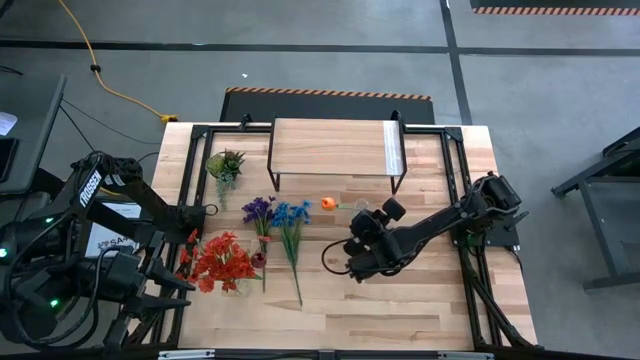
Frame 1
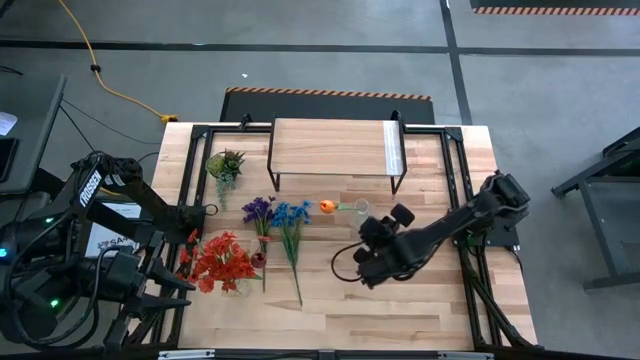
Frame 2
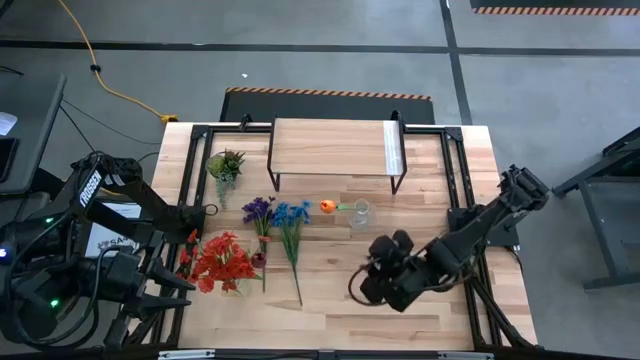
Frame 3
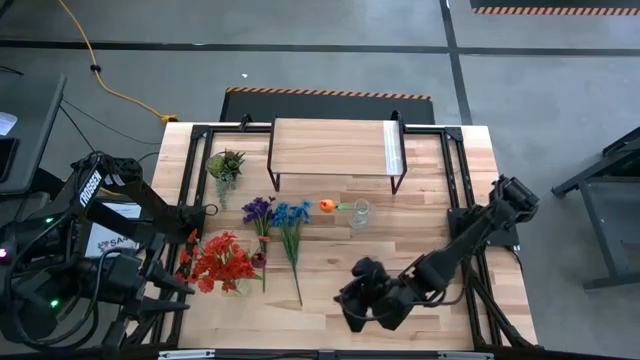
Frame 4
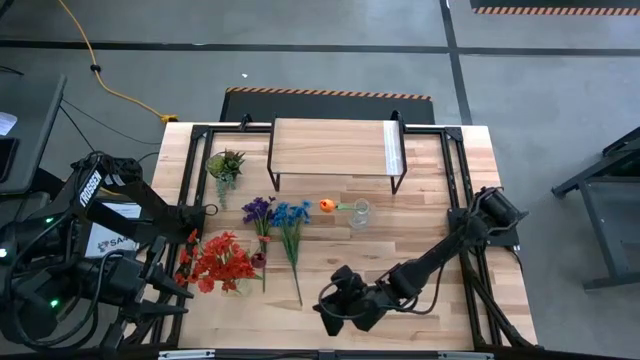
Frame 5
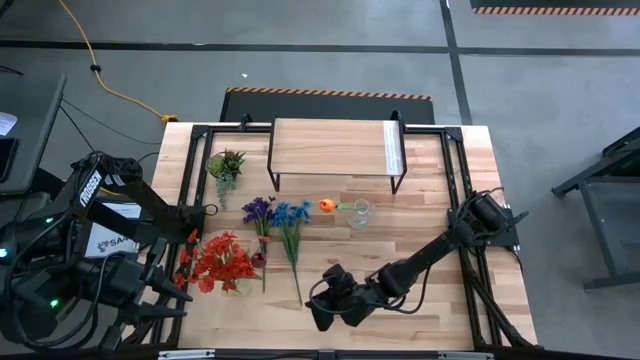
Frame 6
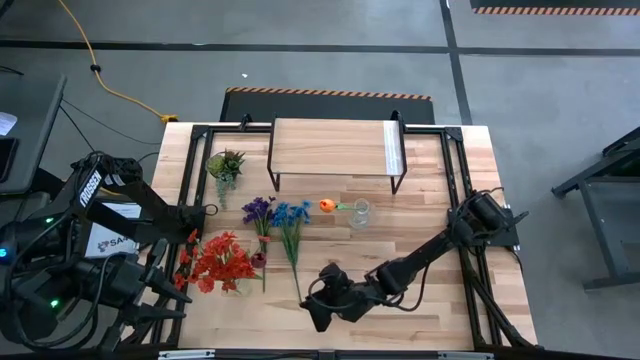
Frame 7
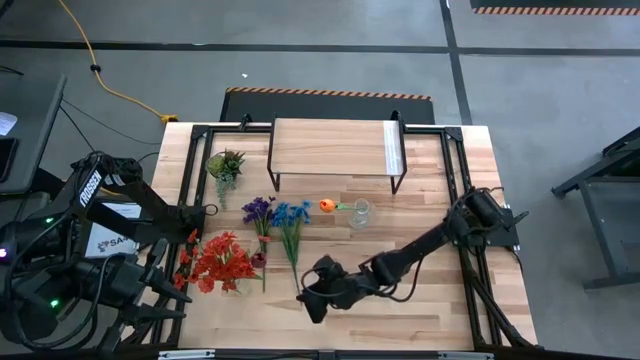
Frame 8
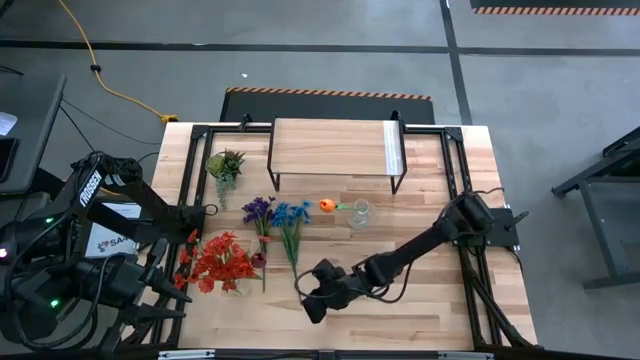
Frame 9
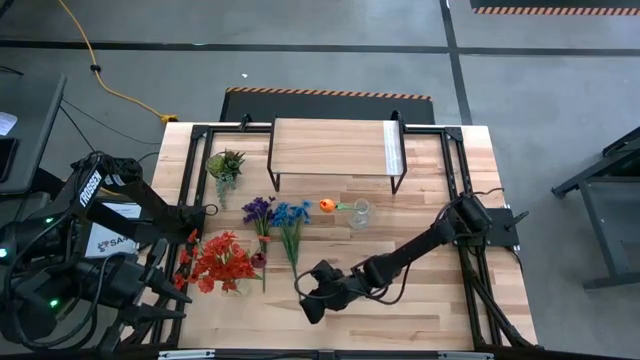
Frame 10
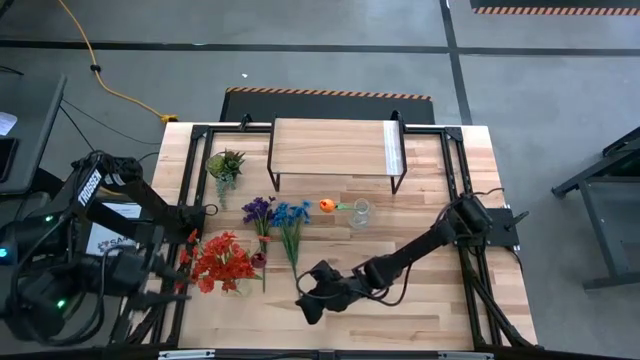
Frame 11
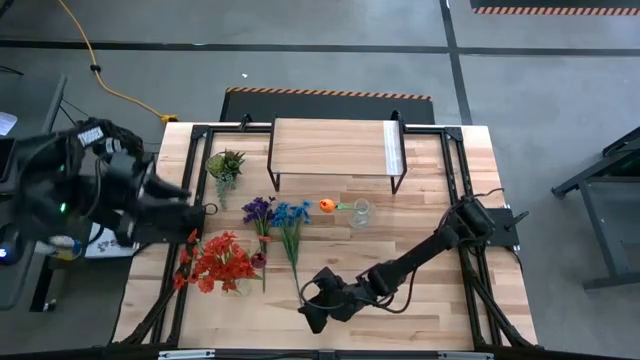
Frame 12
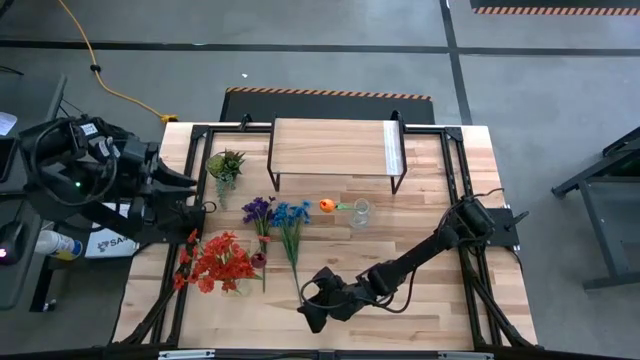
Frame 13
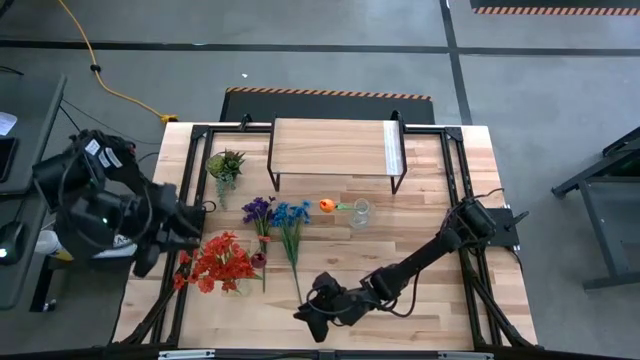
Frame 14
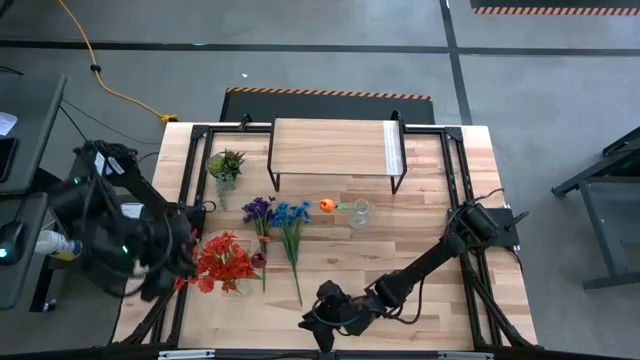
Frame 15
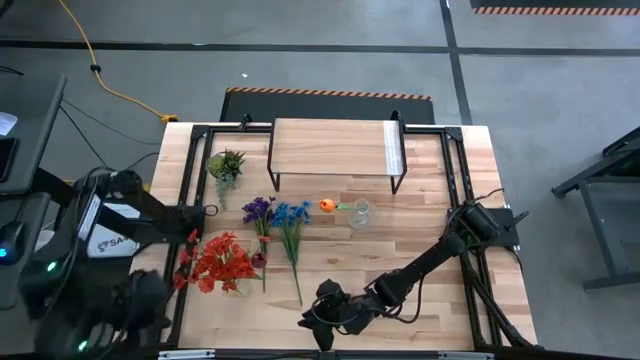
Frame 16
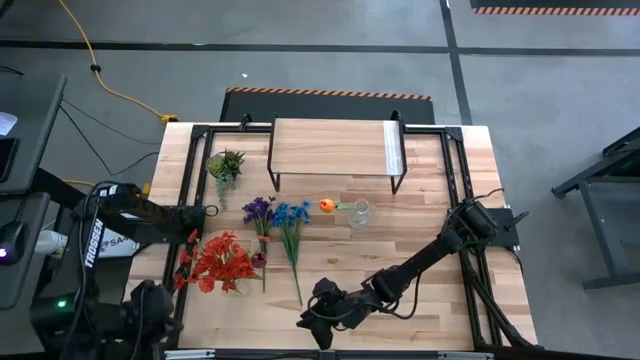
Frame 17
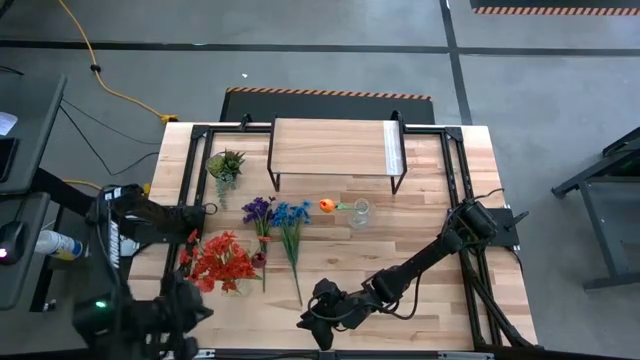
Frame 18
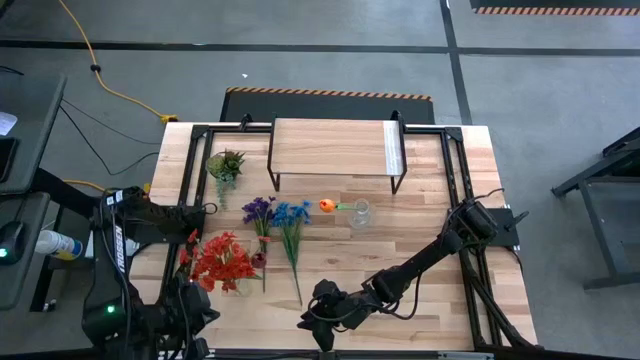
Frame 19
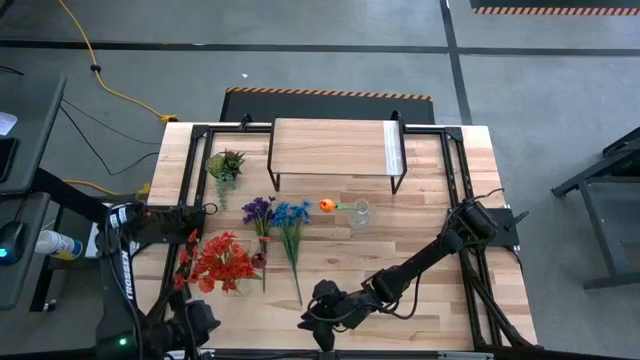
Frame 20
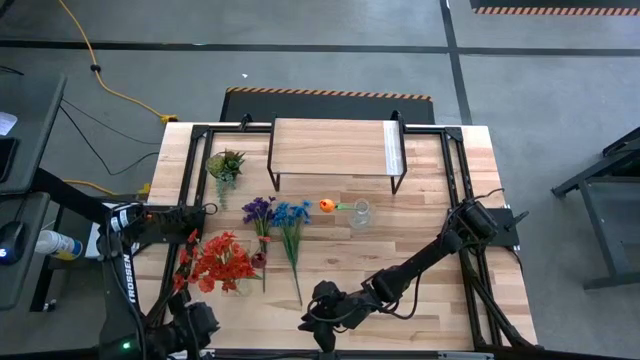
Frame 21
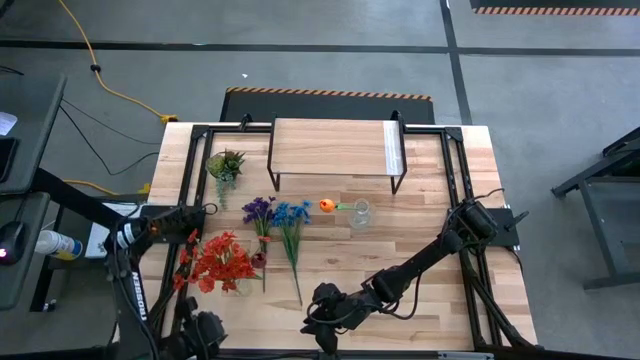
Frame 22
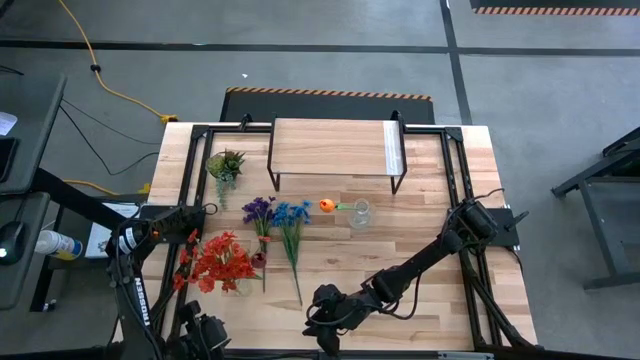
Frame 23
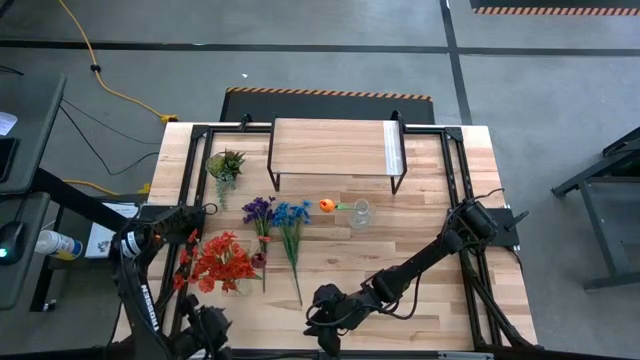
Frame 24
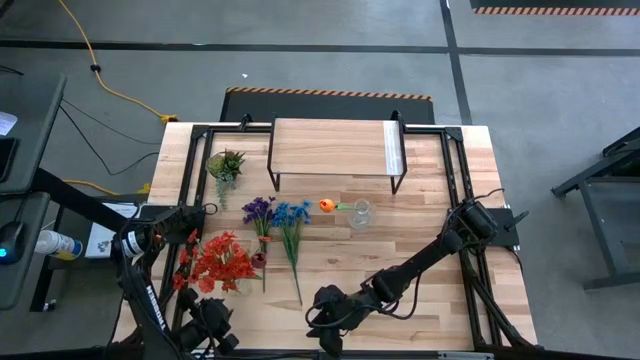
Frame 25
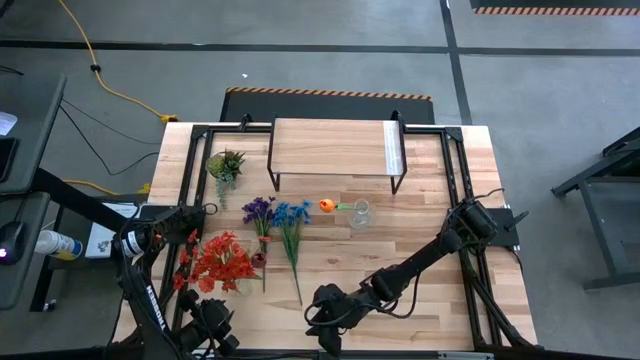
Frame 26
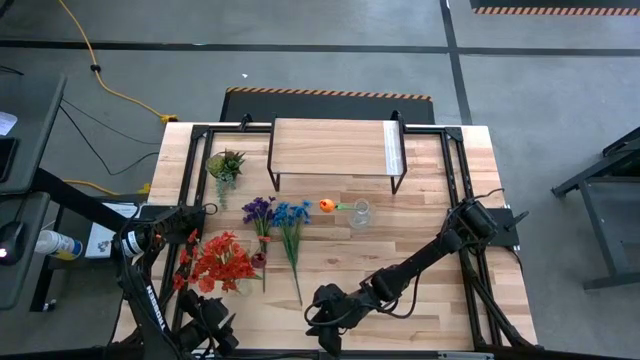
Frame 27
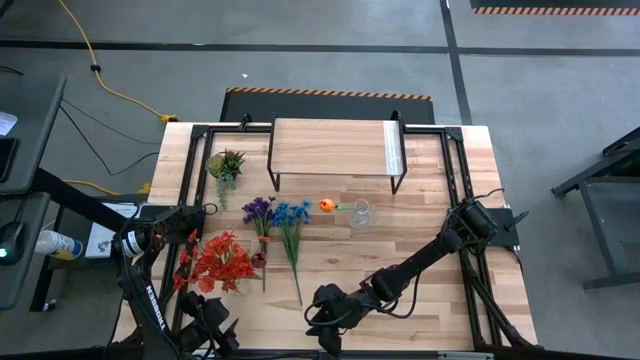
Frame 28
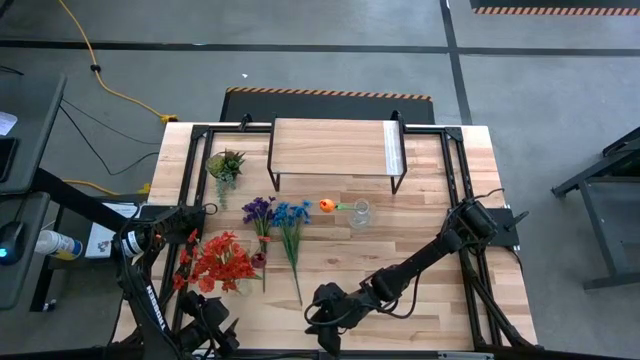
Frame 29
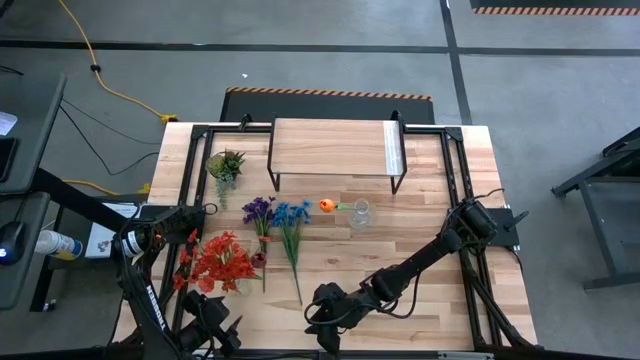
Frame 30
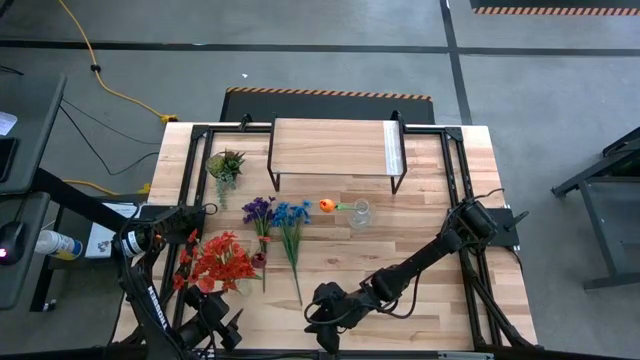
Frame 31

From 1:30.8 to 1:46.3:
Task: Pick and place flowers into a vace then onto a shelf
Move the bottom transparent vase to the bottom center of the table

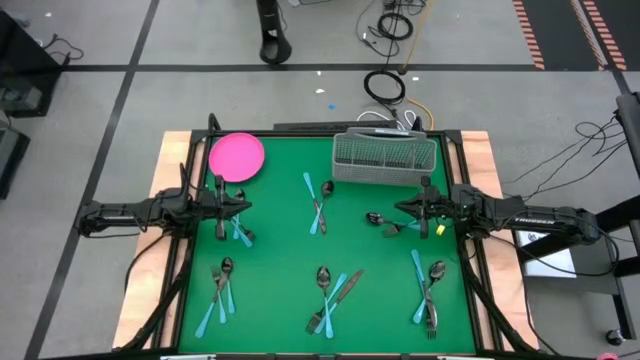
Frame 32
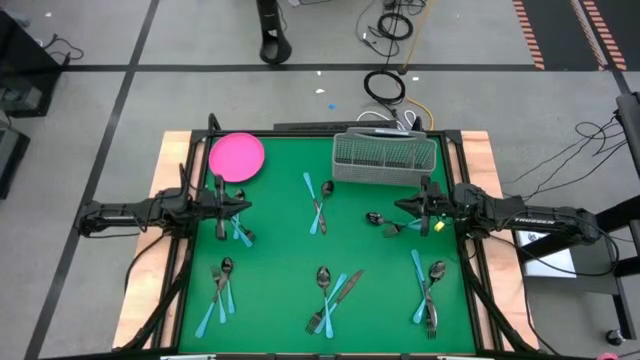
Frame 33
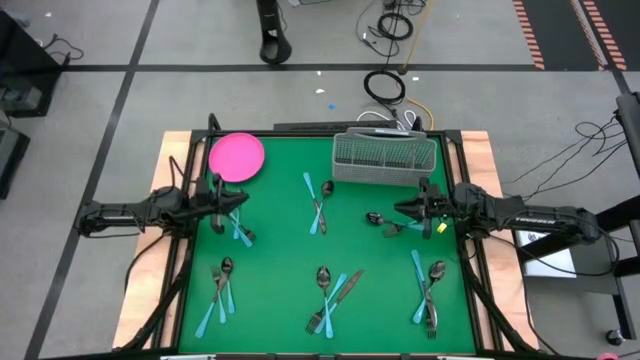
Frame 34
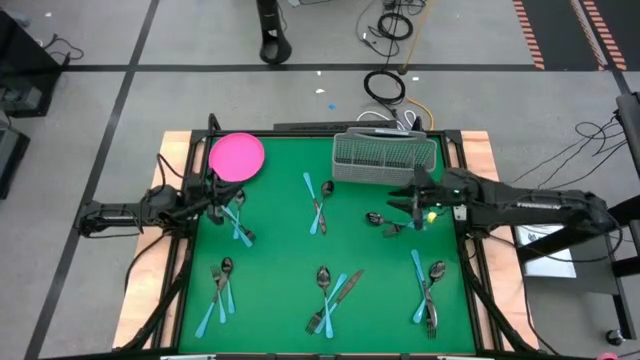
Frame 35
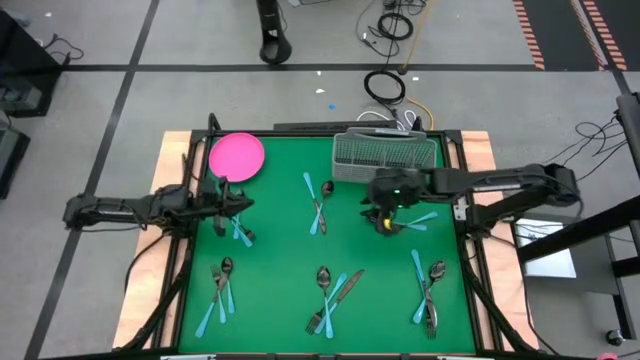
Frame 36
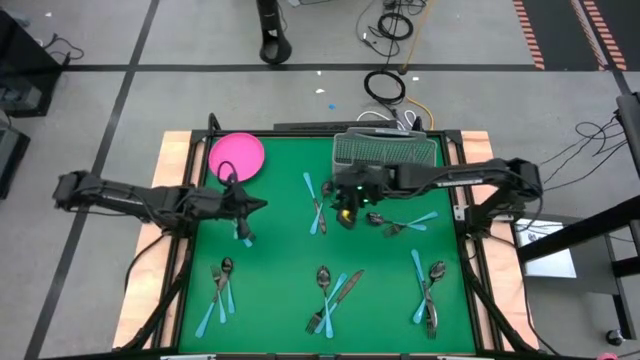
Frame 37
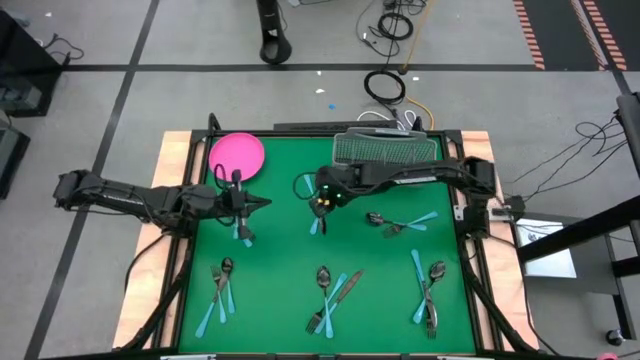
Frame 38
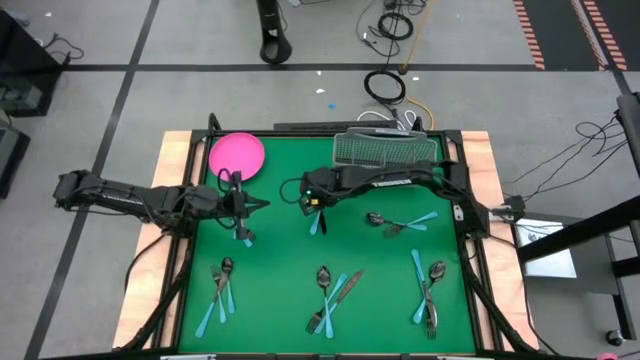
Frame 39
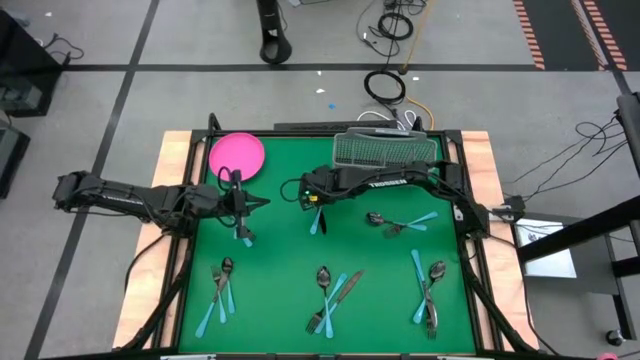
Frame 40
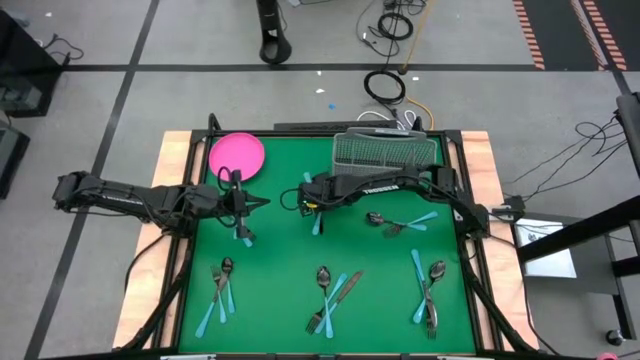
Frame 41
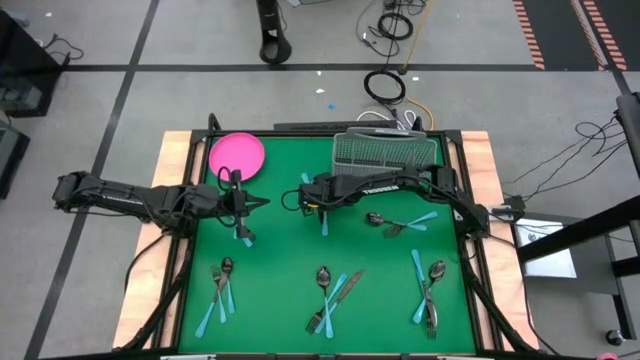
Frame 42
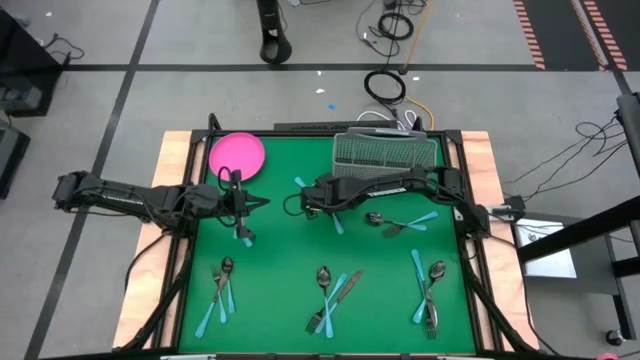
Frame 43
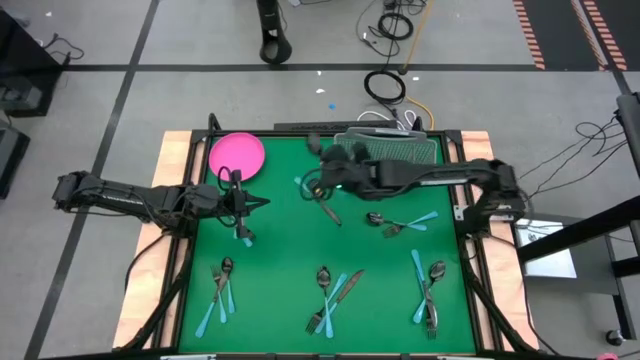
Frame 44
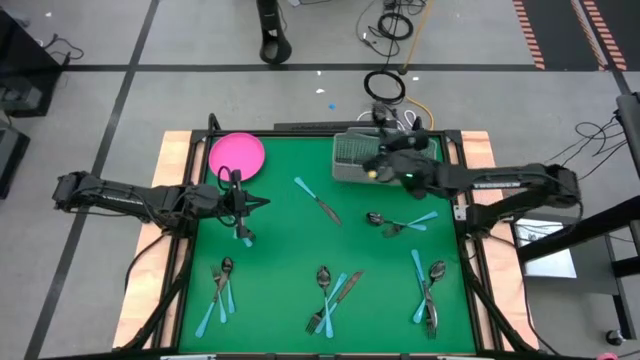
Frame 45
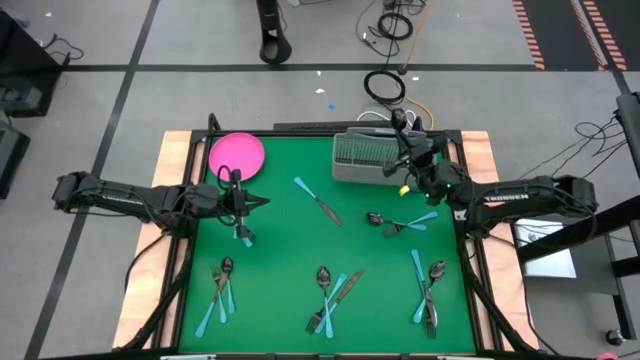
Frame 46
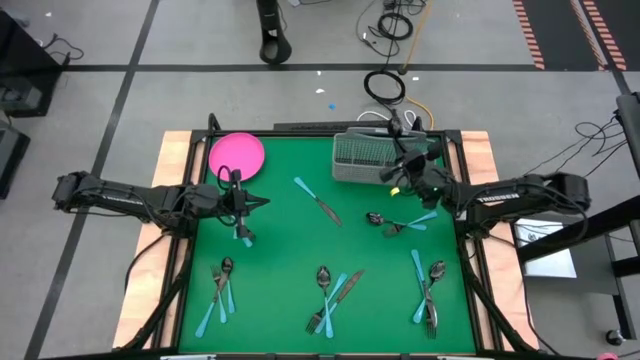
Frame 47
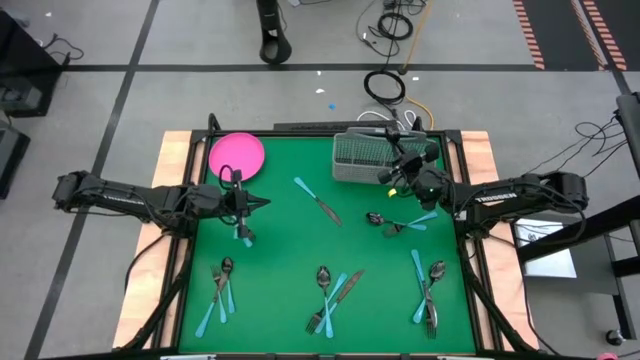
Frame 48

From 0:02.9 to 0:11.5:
Task: Sort silverware
Put the top center black spoon into the cutlery rack
